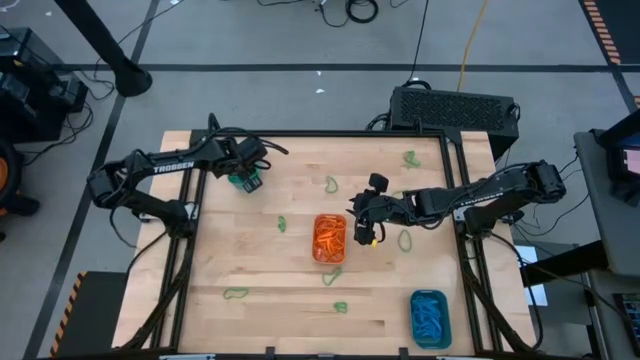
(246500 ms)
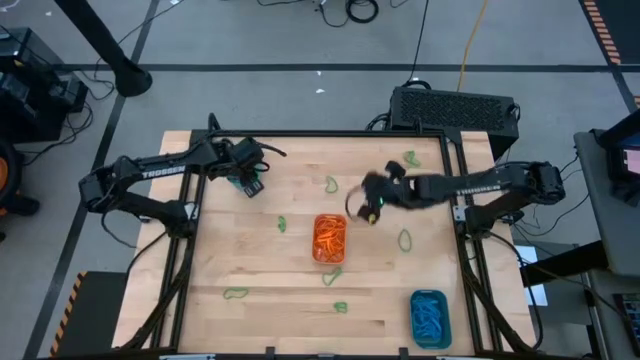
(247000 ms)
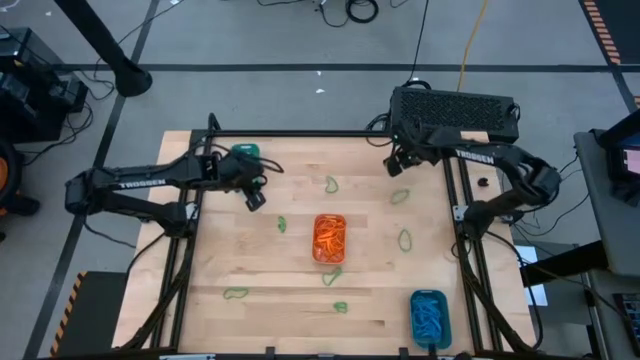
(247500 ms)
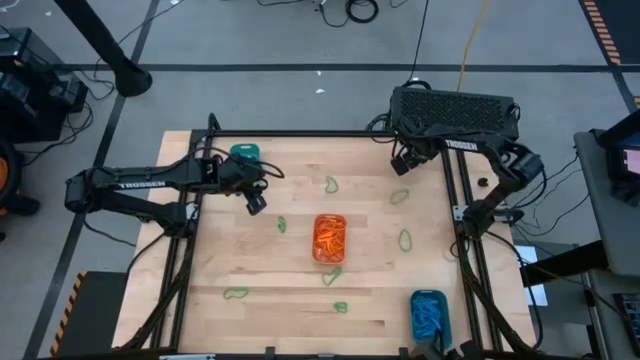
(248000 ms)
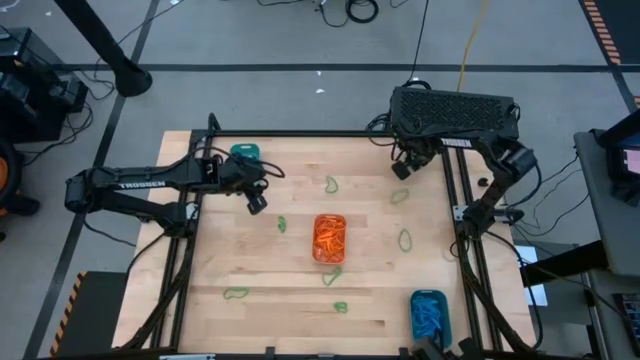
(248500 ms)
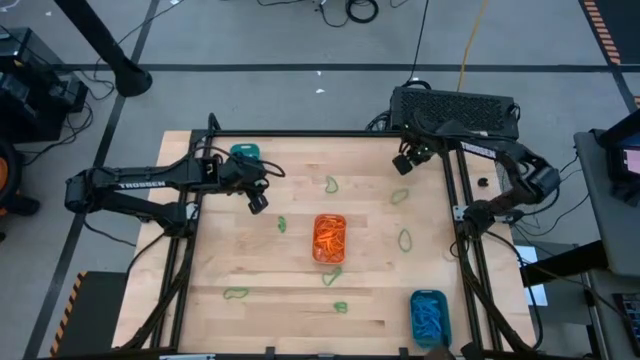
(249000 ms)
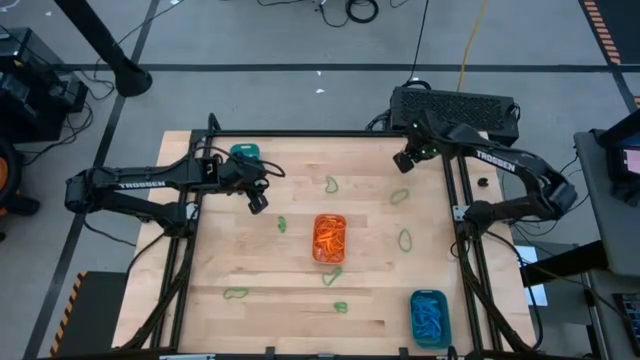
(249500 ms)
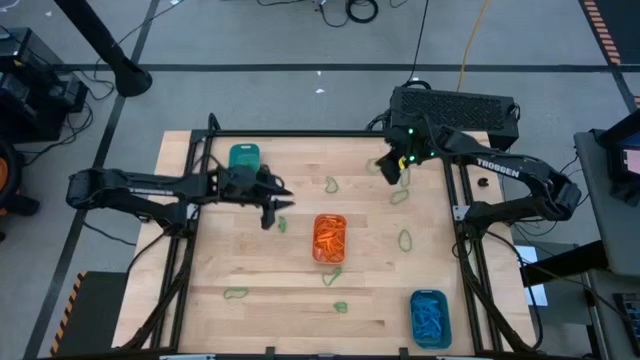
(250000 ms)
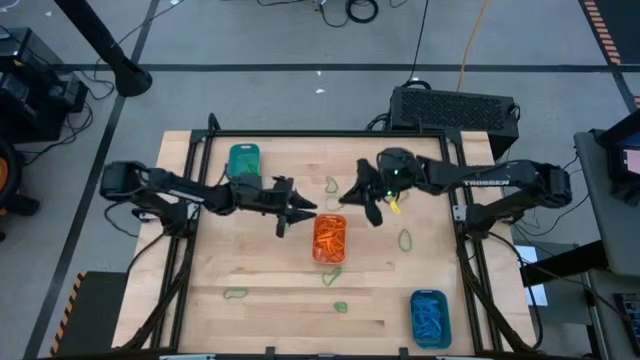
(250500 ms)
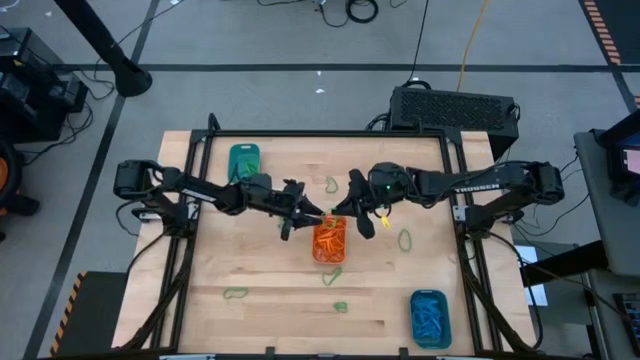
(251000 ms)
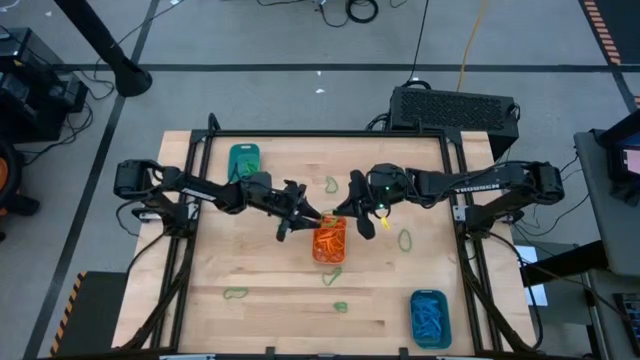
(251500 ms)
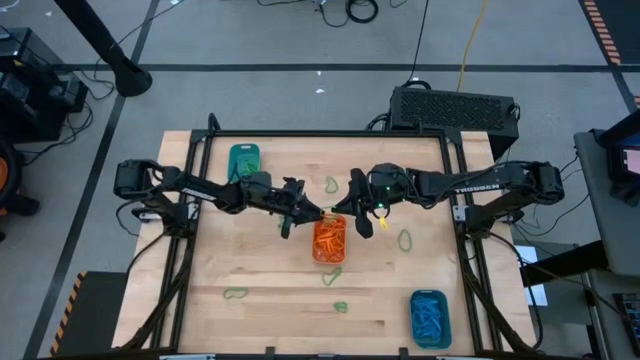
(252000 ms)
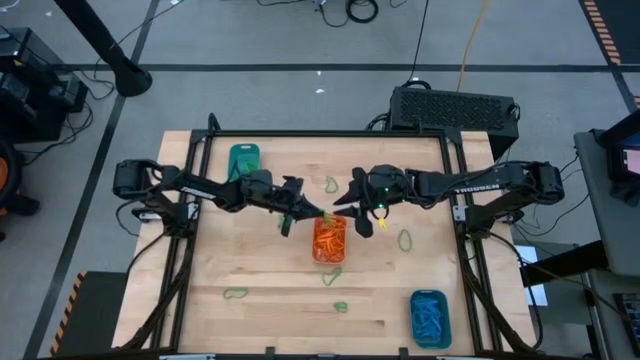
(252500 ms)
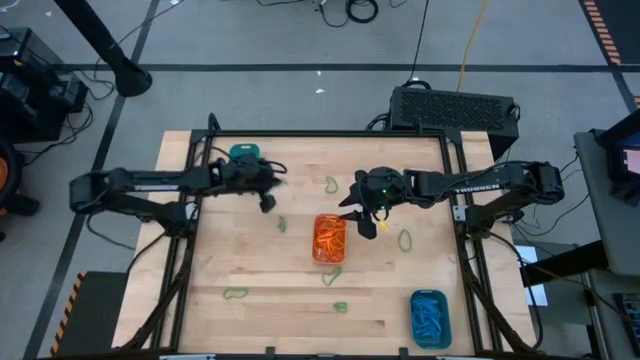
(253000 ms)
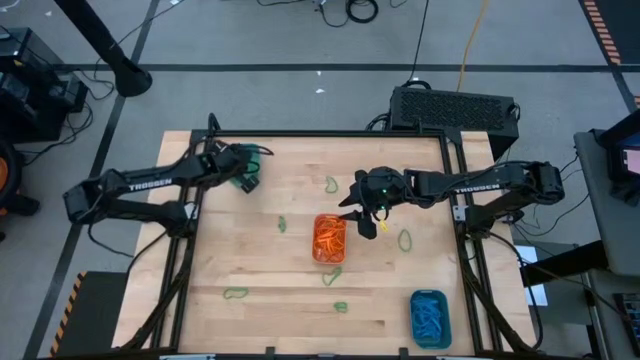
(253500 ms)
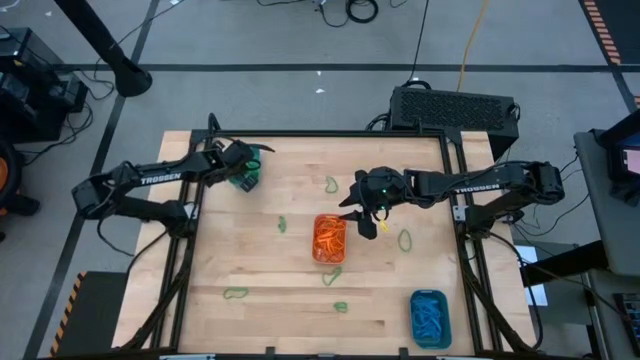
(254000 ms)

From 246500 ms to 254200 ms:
Task: Sort rubber bands into baskets
Put the green rubber band into the green bin

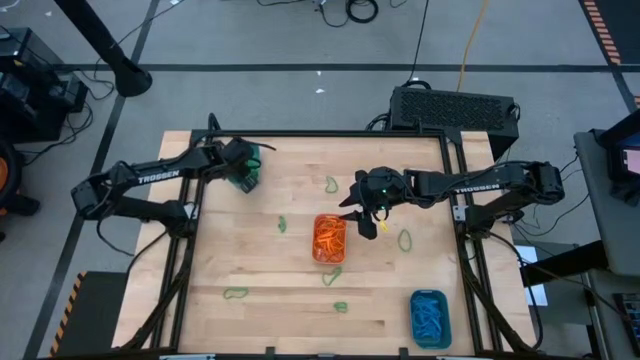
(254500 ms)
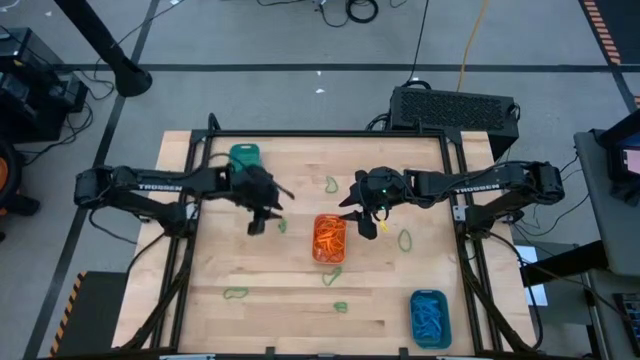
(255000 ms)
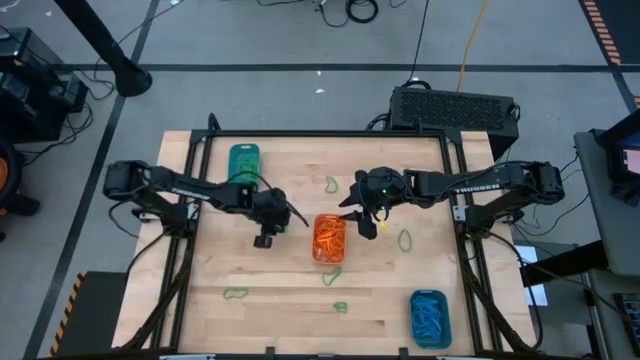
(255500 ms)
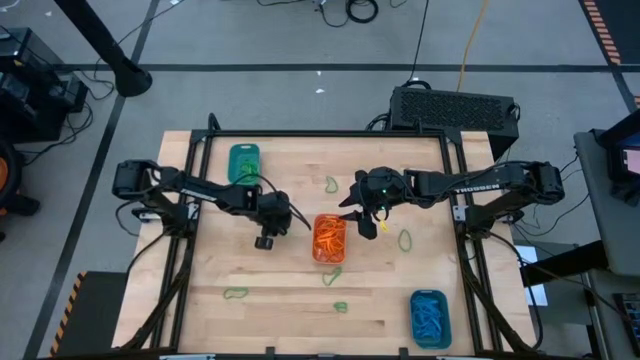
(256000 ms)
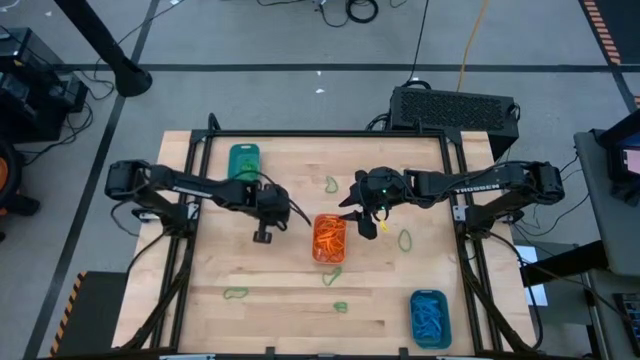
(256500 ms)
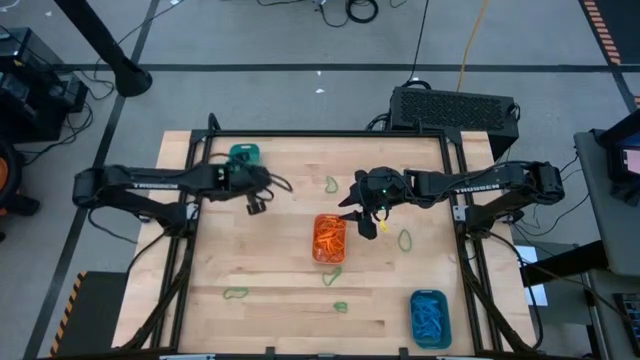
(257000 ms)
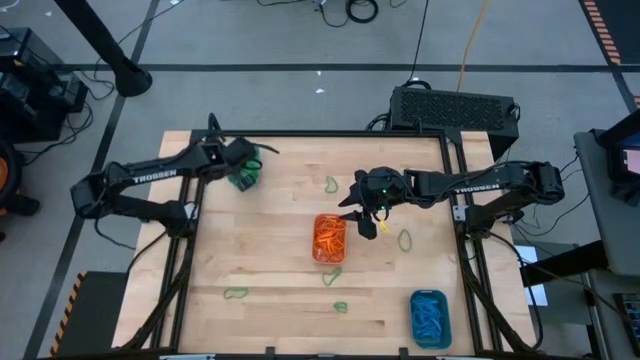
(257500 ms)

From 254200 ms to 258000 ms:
Put the green rubber band into the green bin

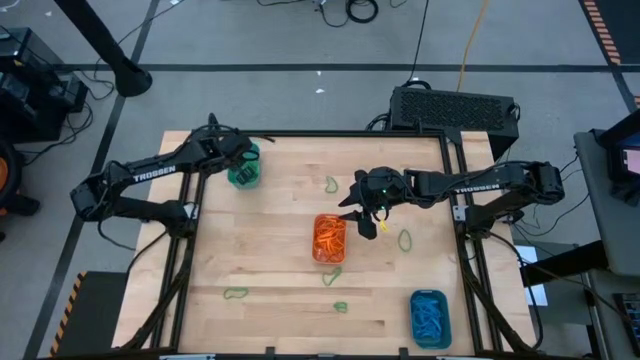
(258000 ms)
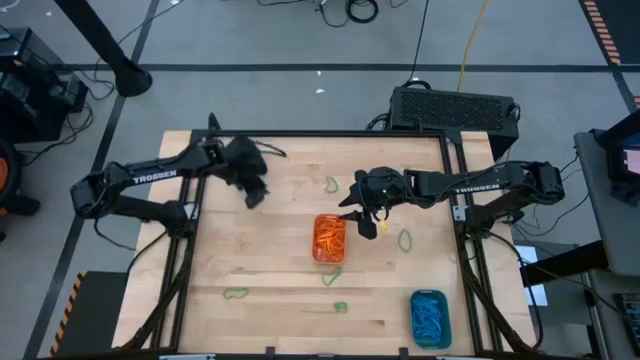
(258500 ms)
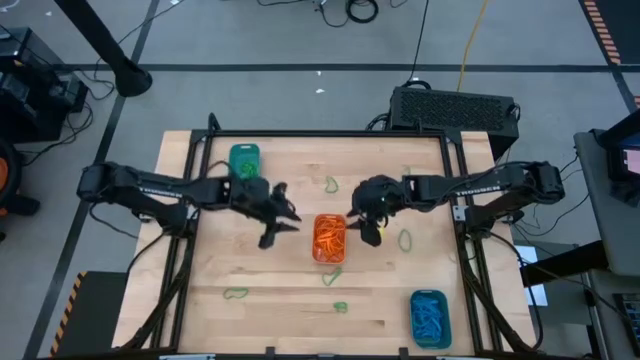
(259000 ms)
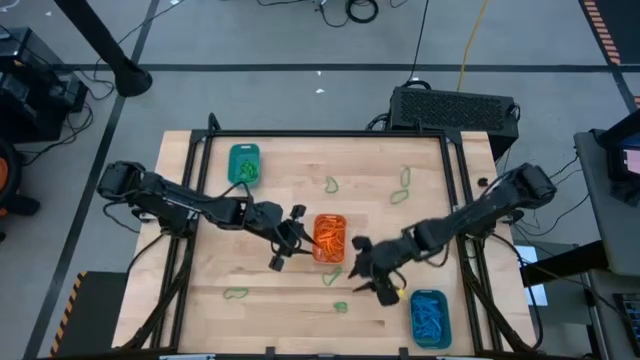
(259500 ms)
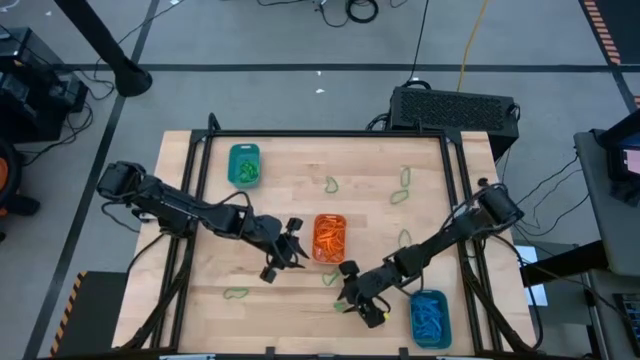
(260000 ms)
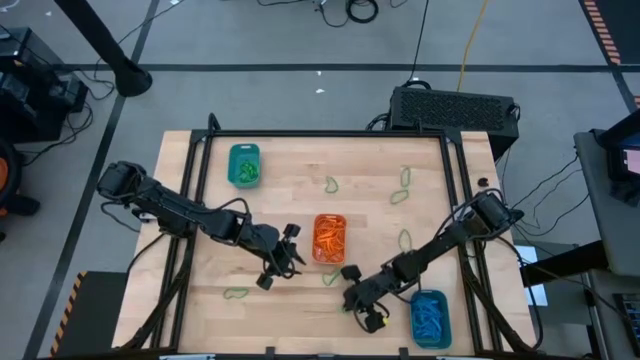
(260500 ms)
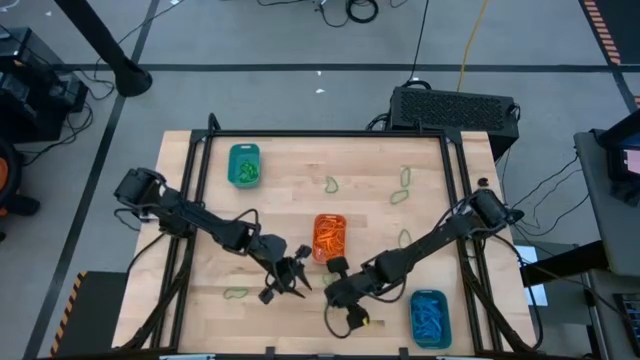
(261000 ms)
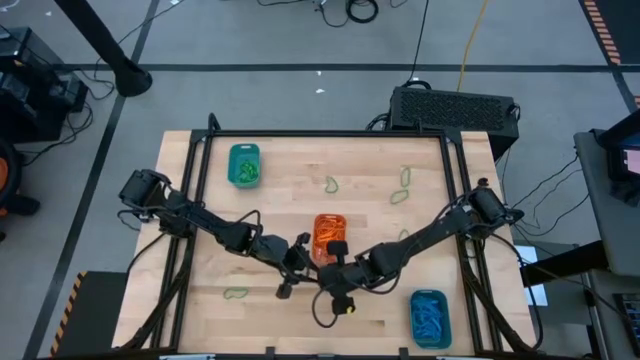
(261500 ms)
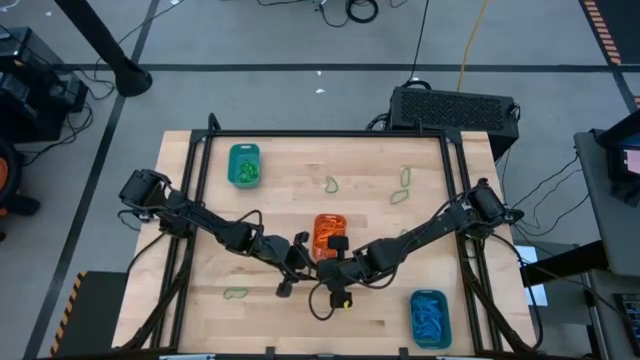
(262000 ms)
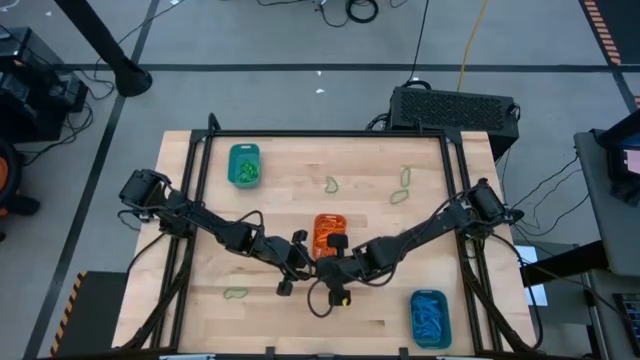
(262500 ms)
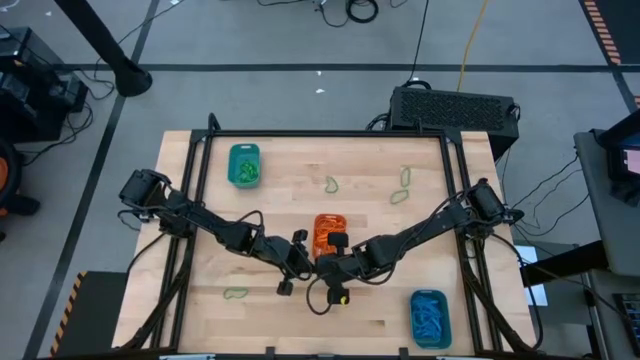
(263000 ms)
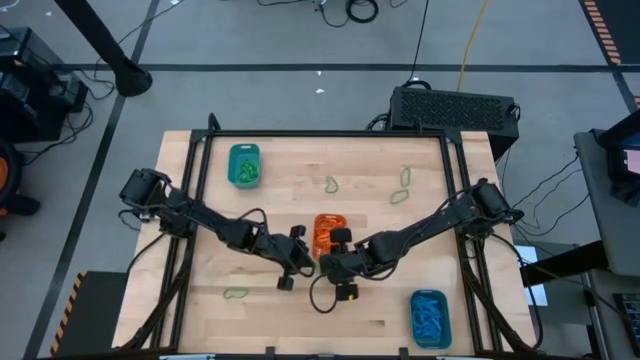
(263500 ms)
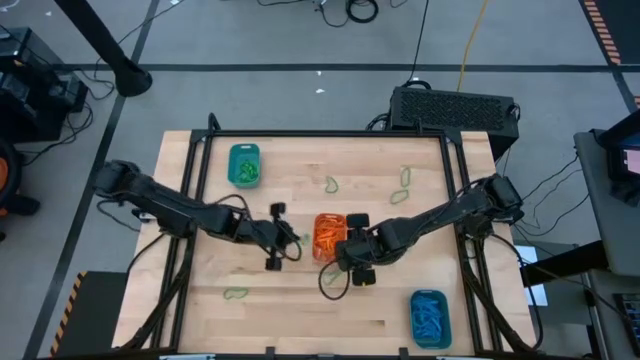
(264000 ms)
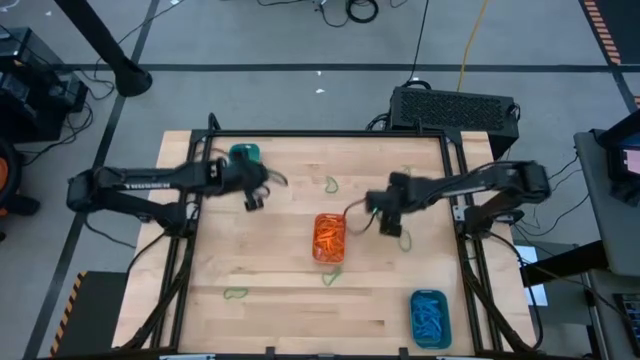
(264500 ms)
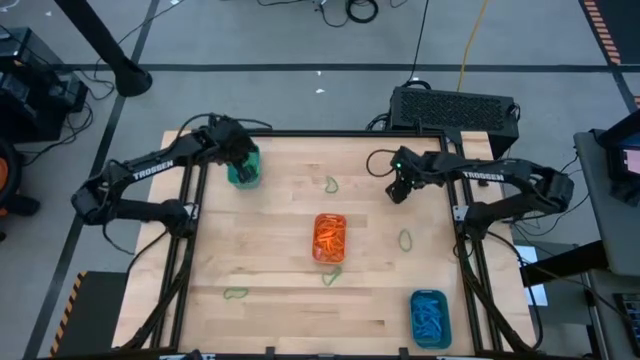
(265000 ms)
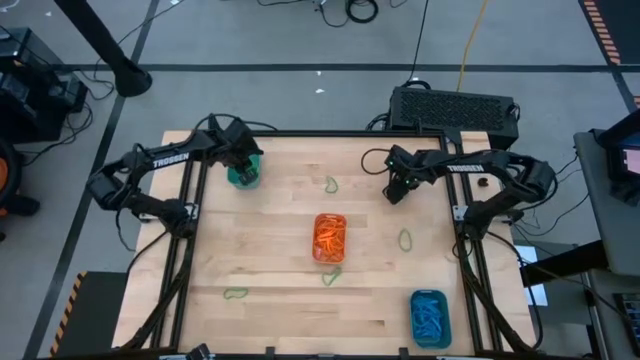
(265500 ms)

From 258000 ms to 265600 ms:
Put the green rubber band into the green bin

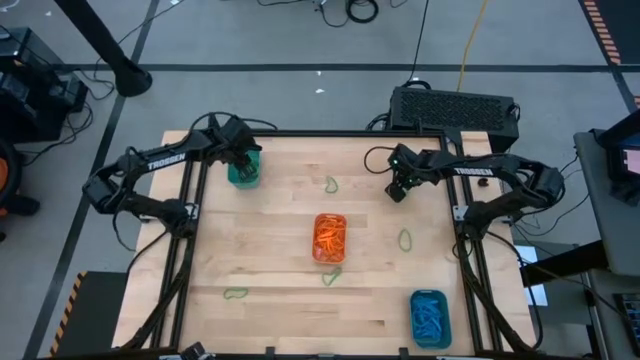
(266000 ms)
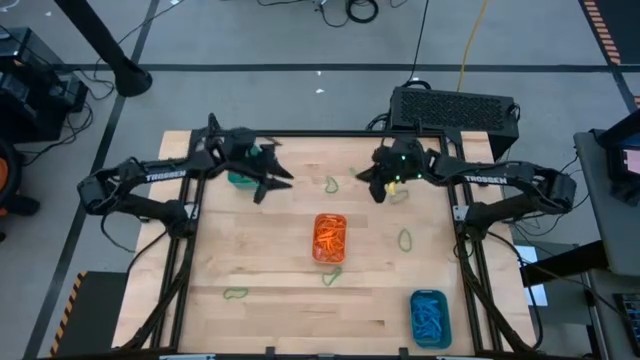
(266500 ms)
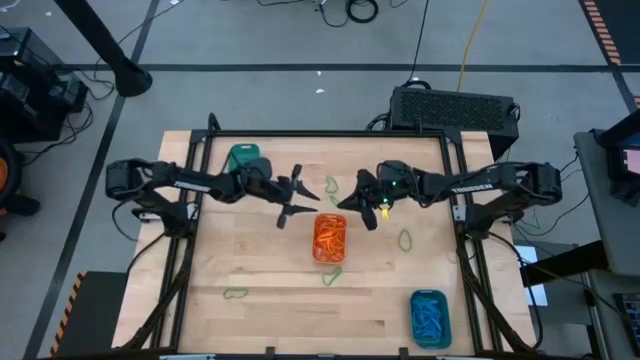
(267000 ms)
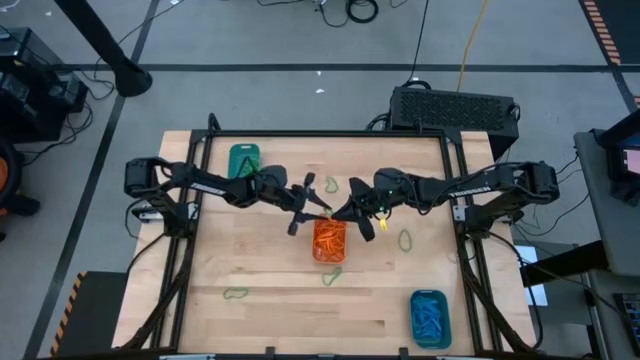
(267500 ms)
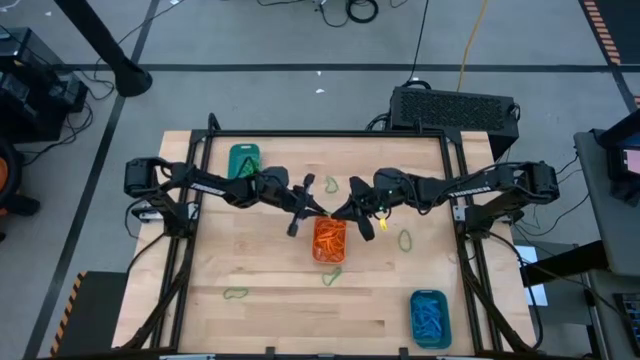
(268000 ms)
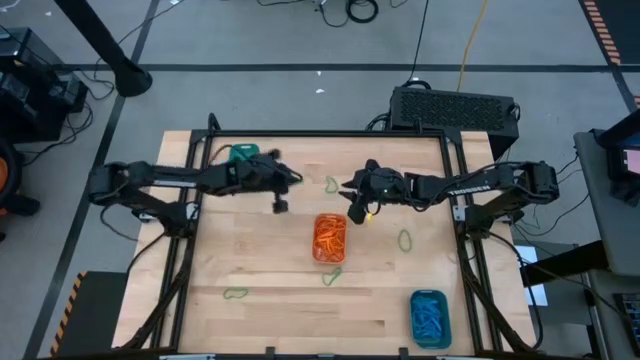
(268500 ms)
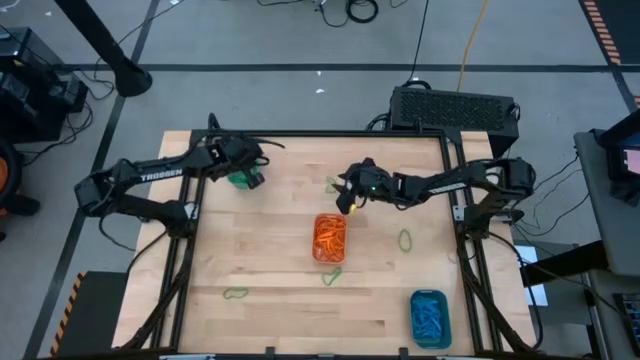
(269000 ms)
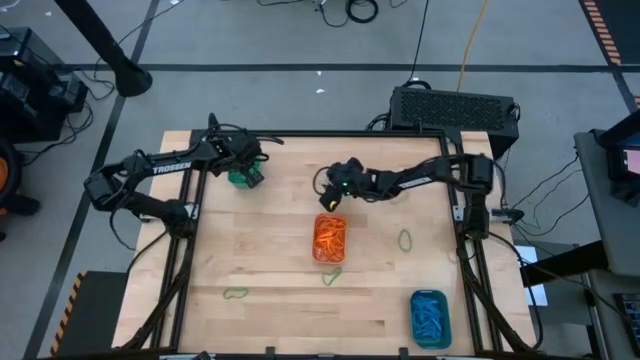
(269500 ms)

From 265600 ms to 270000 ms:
Put the green rubber band into the green bin
